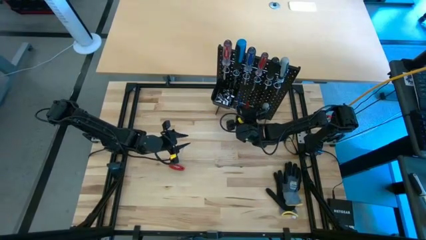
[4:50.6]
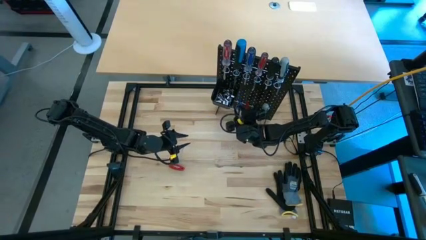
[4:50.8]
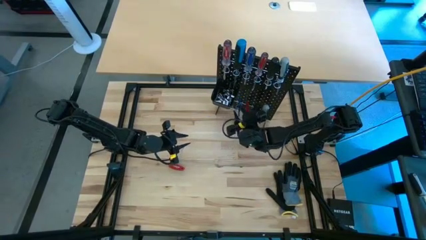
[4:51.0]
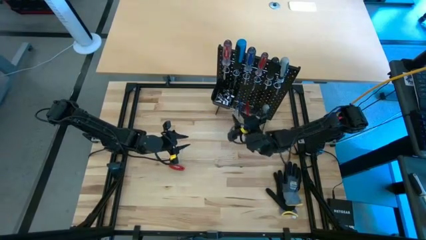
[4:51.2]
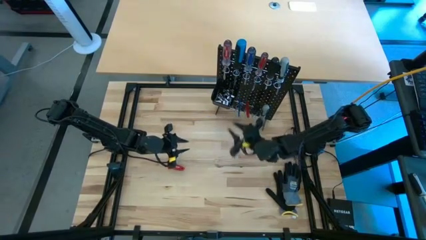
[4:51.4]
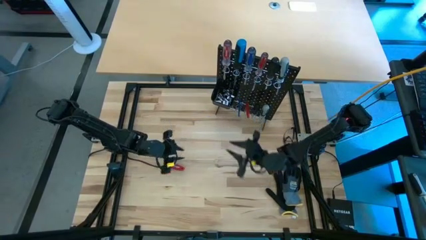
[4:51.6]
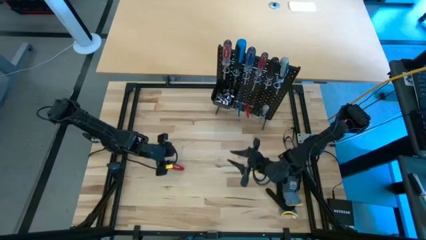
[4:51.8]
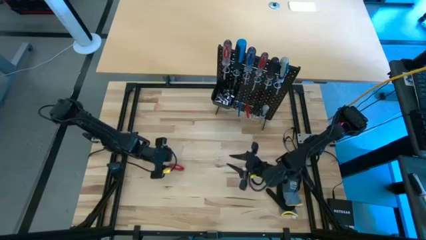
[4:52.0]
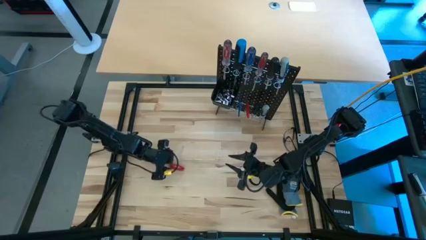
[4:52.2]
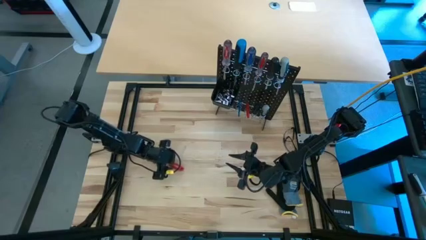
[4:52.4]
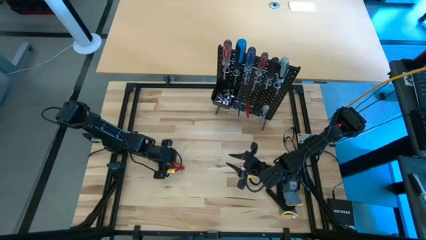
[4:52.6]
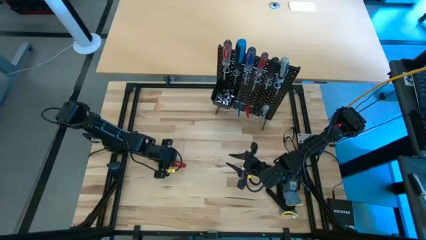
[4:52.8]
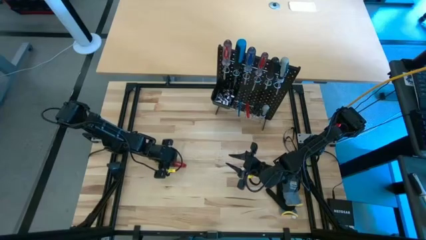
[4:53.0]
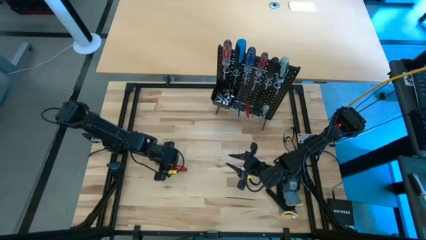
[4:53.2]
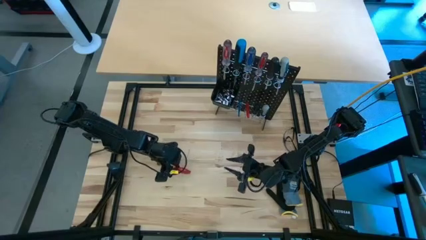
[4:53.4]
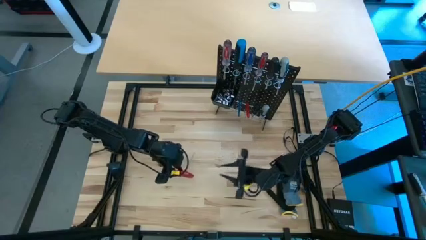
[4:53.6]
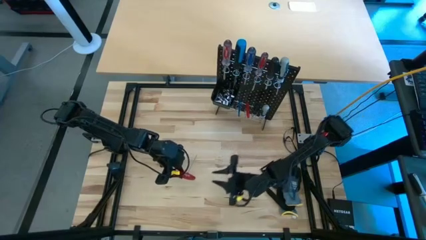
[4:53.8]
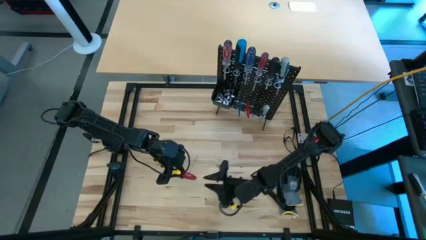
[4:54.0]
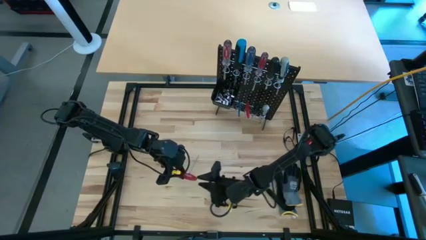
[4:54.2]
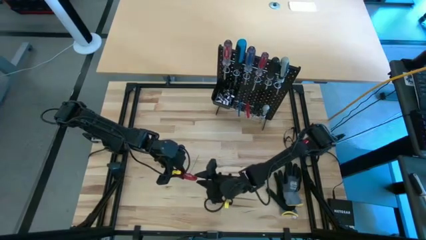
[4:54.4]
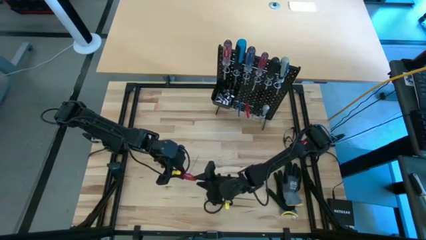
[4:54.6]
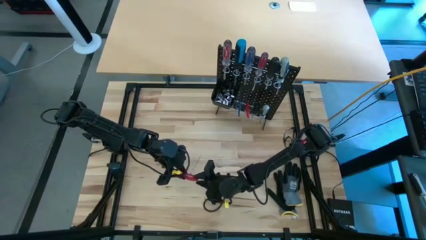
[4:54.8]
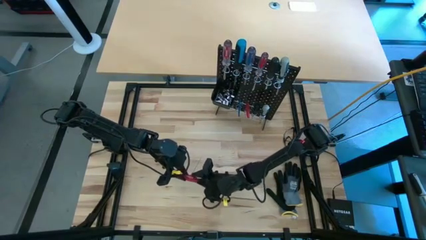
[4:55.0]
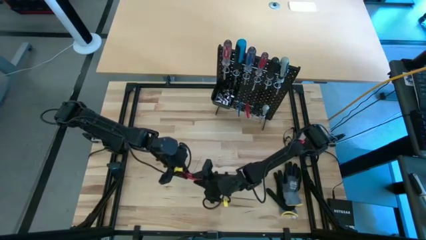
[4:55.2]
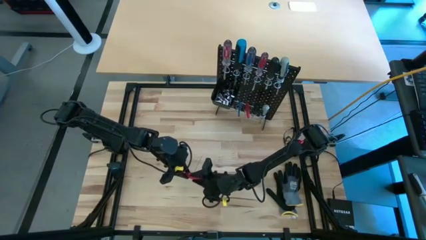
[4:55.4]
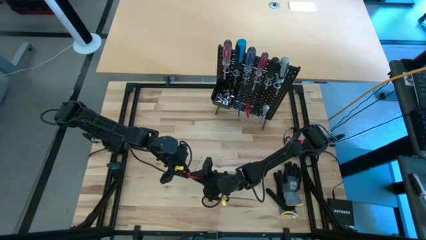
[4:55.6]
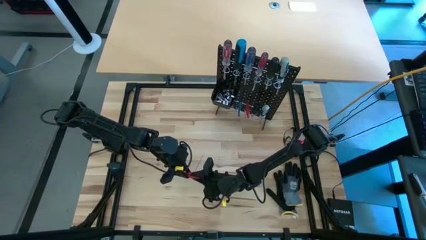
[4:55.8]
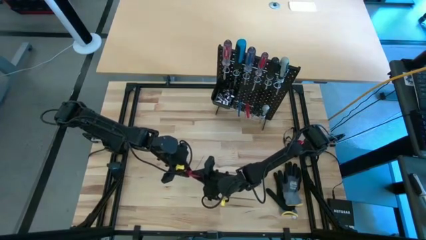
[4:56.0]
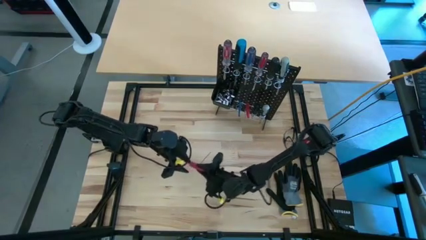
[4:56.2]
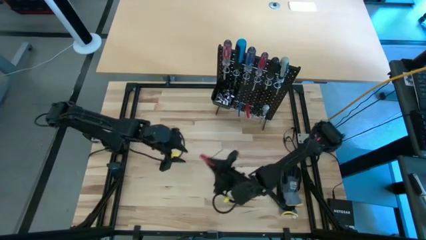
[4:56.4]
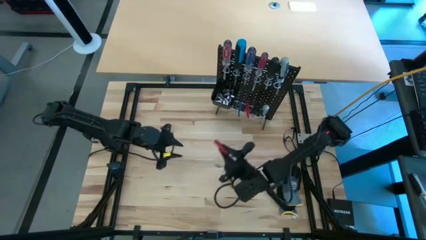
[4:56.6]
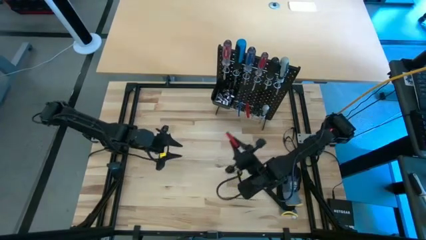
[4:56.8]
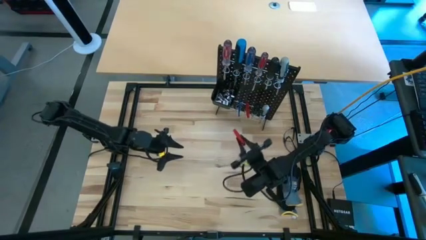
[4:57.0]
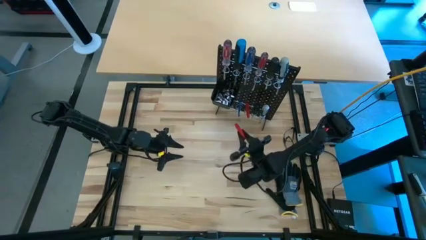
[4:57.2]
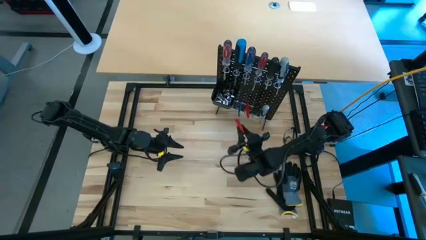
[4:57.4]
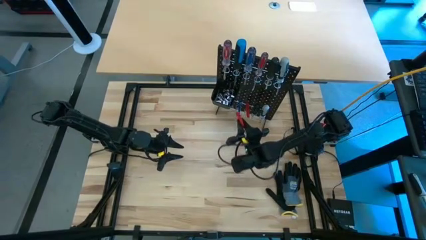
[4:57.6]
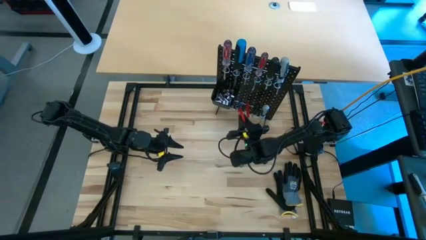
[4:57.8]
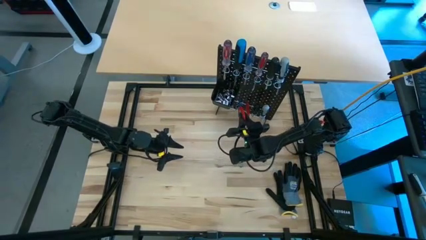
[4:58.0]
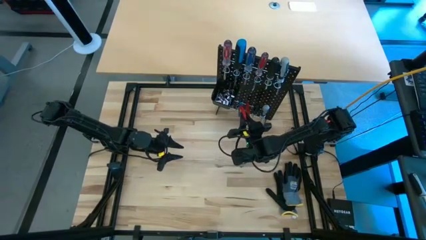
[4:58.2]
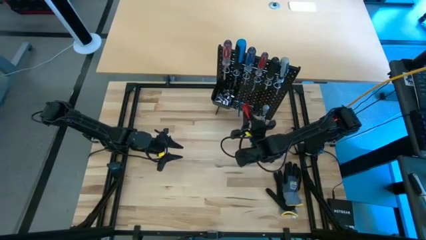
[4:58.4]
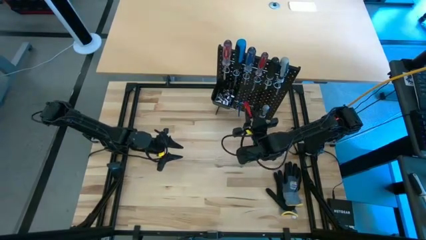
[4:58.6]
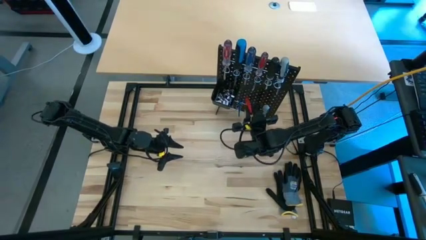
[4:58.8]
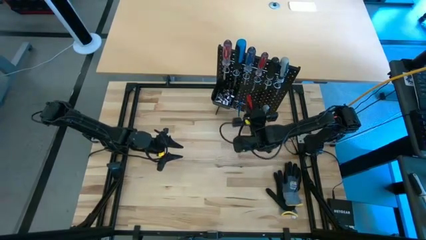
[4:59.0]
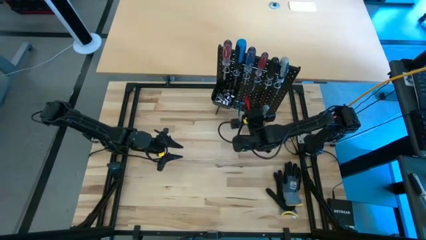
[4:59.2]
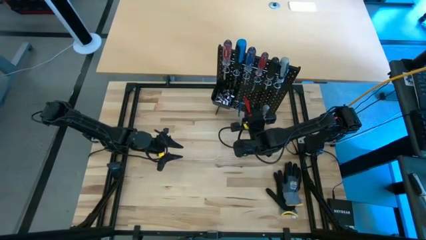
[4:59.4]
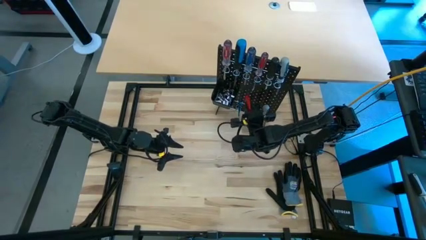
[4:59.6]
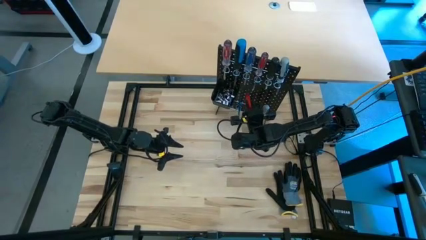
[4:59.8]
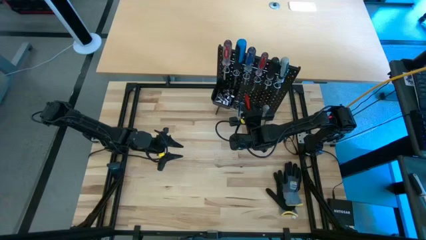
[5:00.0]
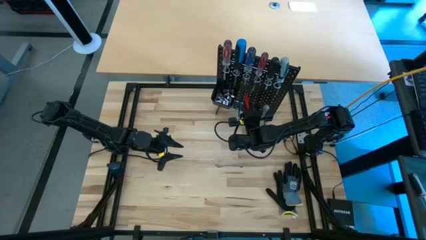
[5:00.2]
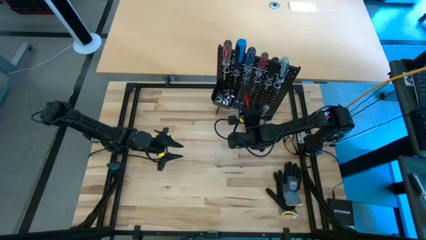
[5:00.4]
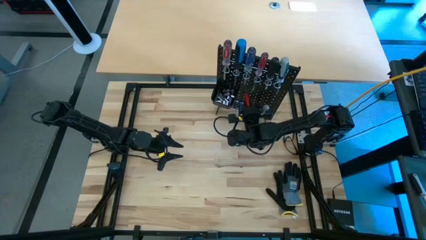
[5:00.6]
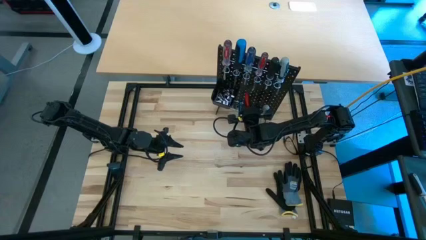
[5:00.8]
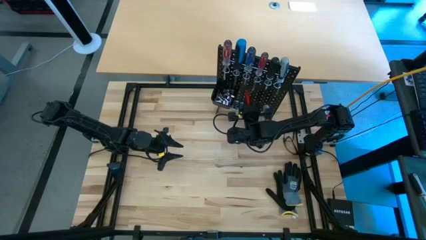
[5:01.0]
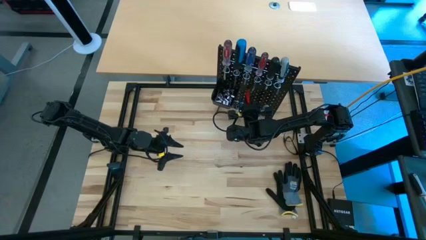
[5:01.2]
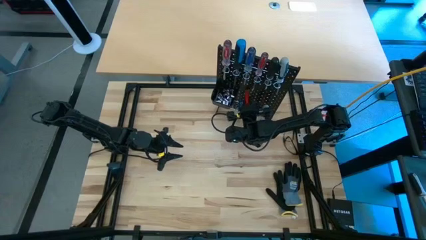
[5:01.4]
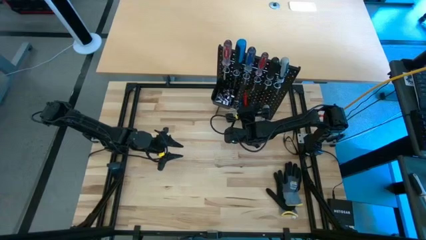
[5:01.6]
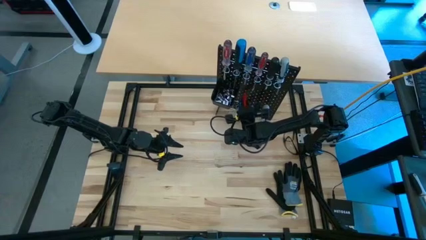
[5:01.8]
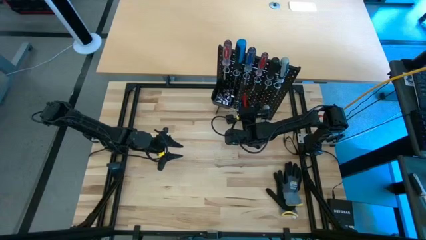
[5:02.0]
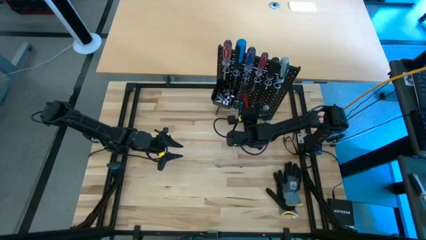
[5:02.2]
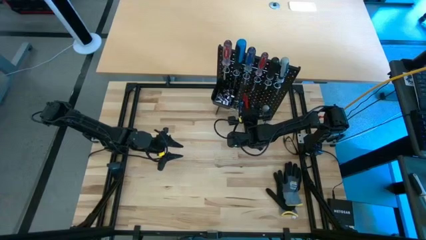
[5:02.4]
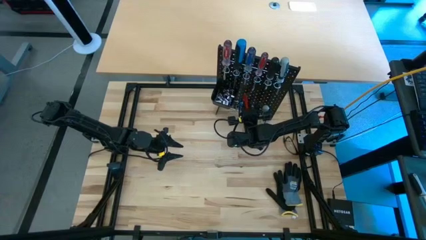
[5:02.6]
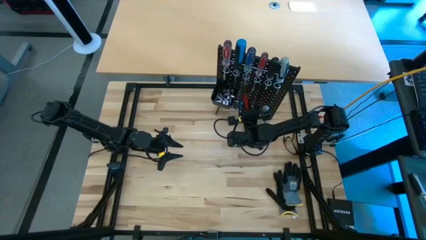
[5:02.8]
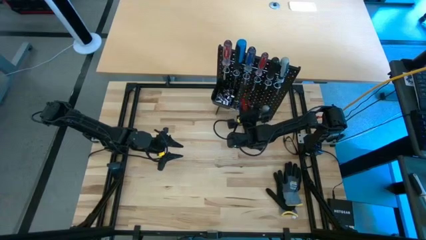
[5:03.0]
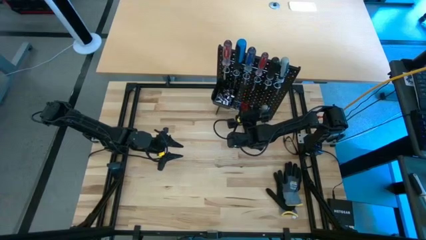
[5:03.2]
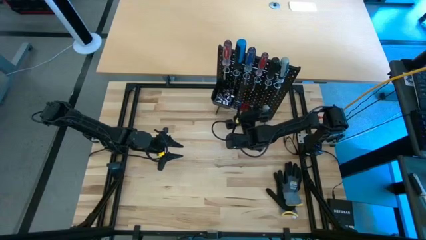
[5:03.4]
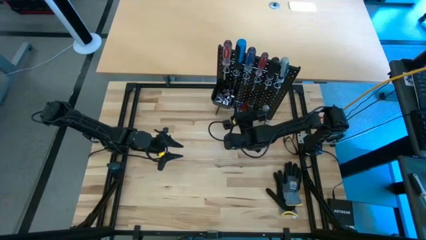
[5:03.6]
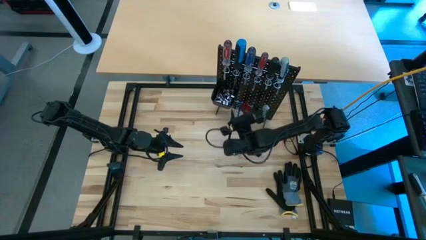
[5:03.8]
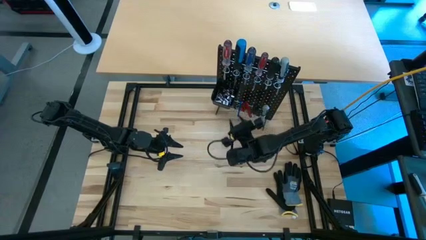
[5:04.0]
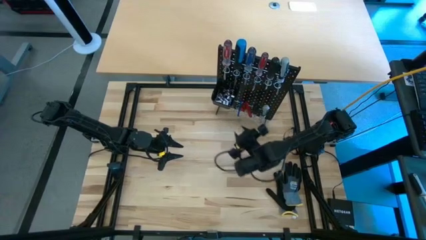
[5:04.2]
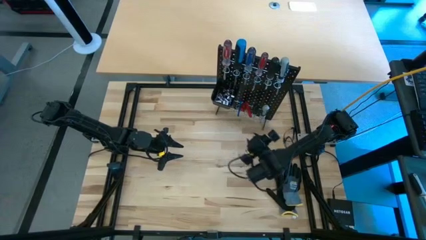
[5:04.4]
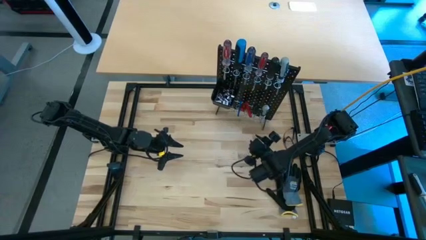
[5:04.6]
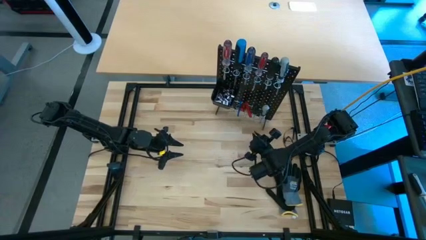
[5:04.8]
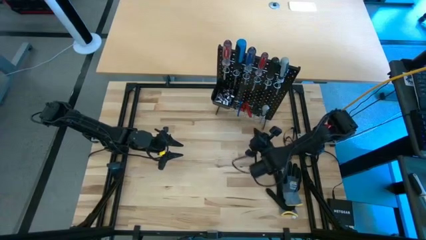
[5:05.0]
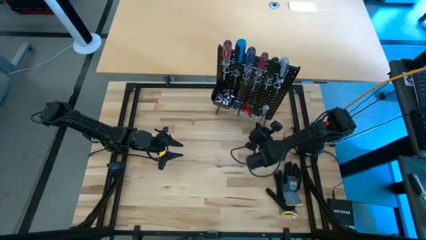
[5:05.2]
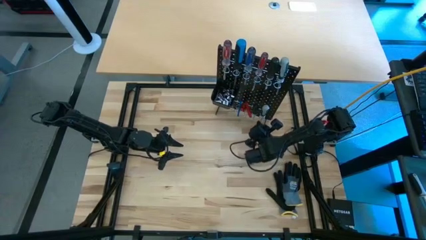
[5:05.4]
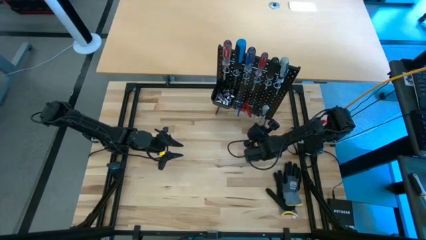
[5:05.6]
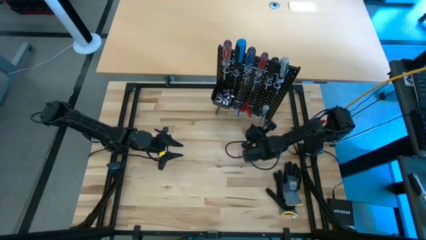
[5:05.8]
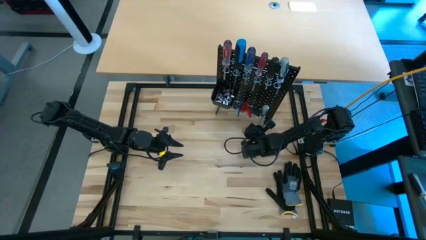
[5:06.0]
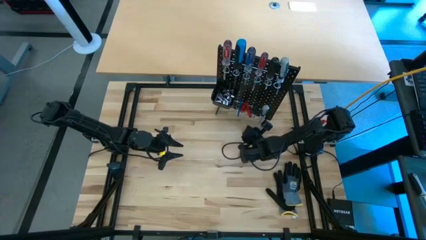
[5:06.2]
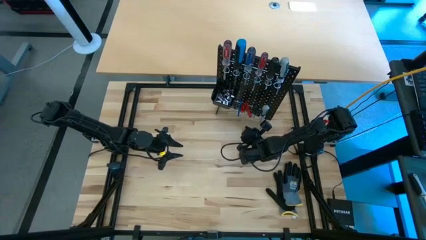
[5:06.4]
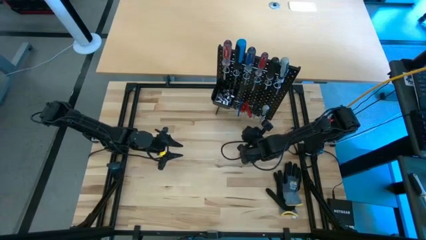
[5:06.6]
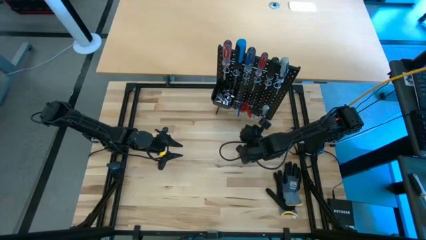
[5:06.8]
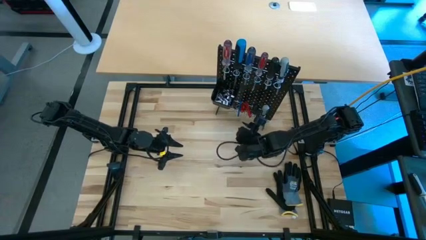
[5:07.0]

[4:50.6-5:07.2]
Task: Hang tools onto peg board
Hang the red allen wrench on the black pegboard
